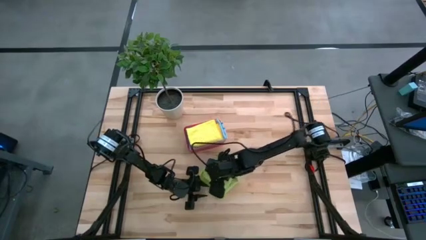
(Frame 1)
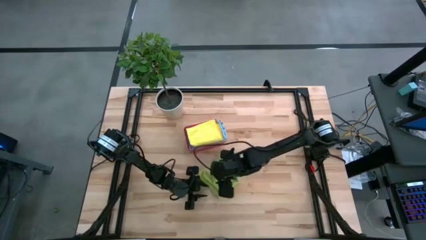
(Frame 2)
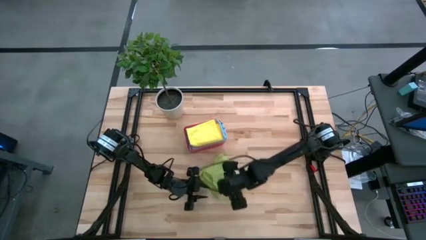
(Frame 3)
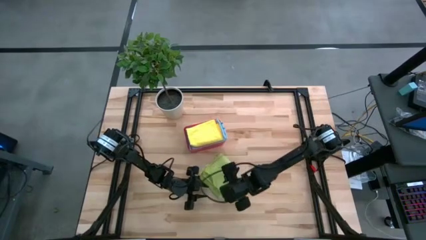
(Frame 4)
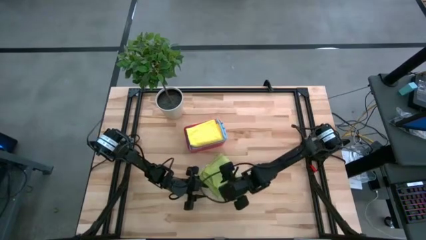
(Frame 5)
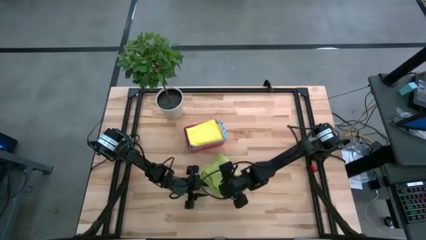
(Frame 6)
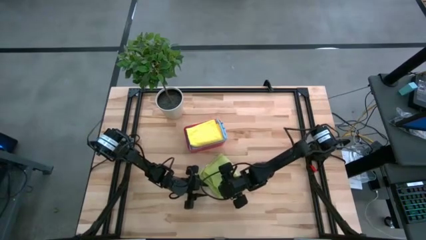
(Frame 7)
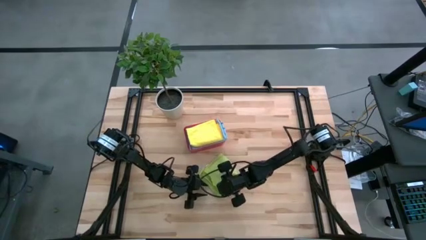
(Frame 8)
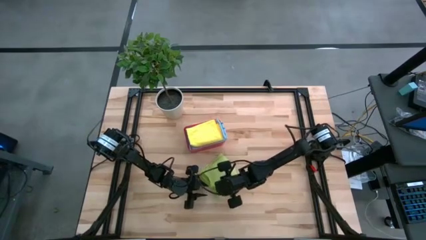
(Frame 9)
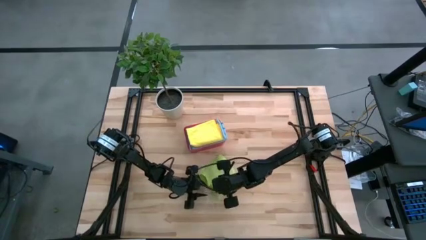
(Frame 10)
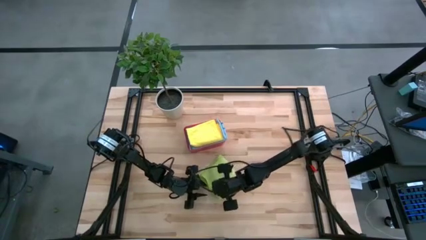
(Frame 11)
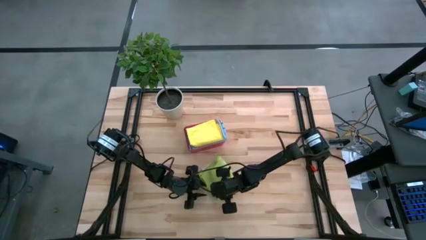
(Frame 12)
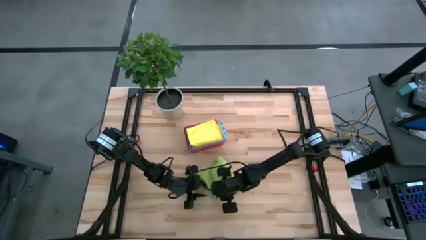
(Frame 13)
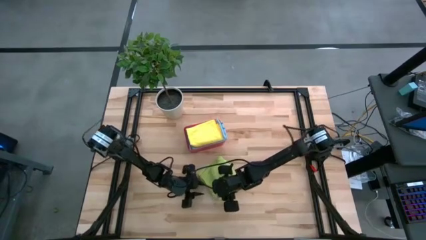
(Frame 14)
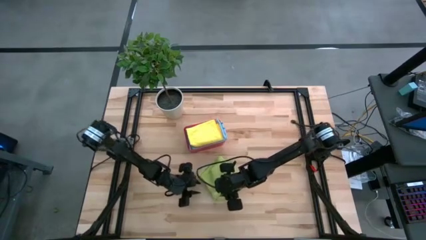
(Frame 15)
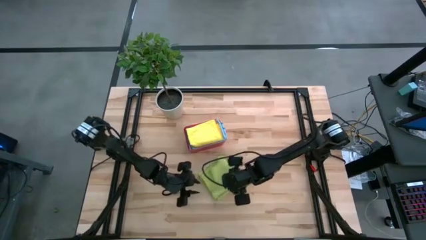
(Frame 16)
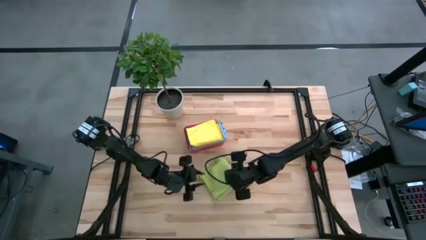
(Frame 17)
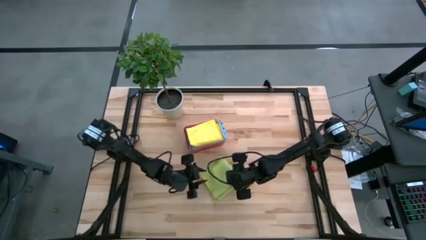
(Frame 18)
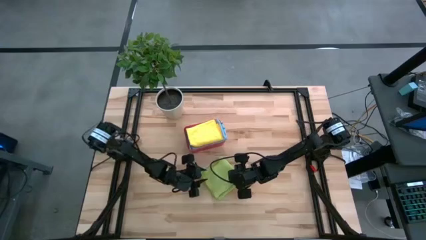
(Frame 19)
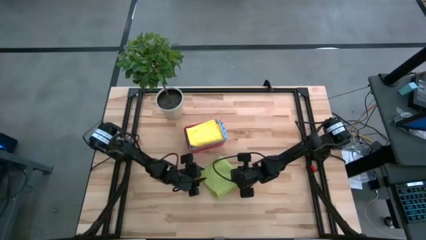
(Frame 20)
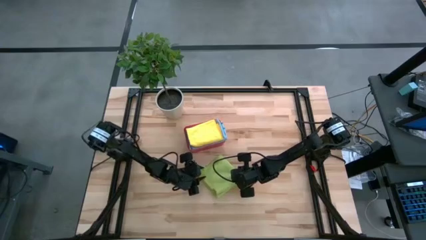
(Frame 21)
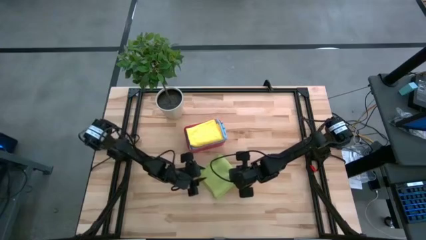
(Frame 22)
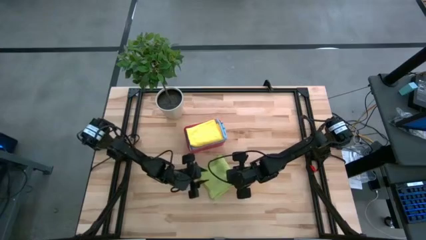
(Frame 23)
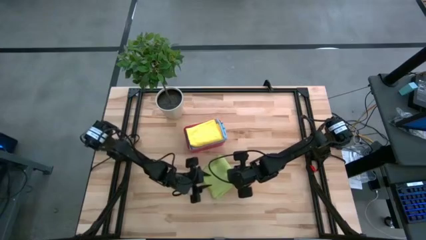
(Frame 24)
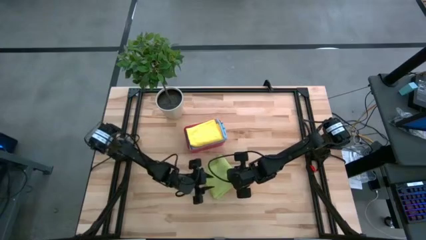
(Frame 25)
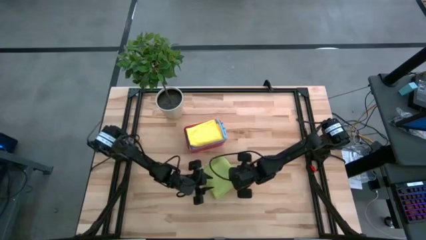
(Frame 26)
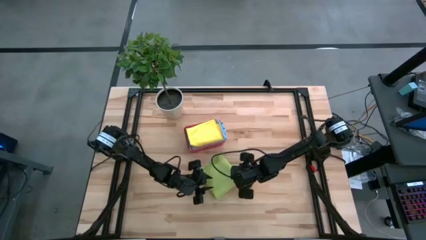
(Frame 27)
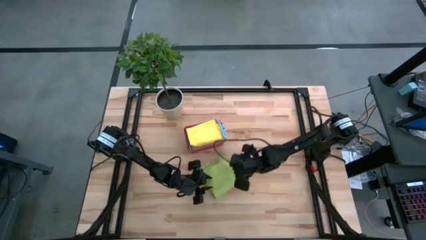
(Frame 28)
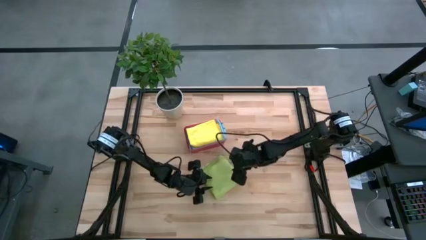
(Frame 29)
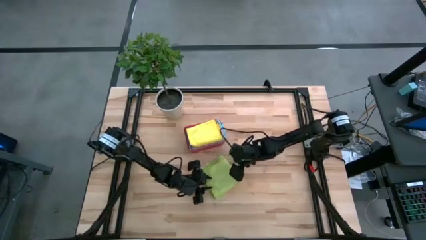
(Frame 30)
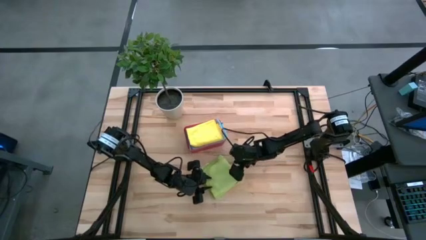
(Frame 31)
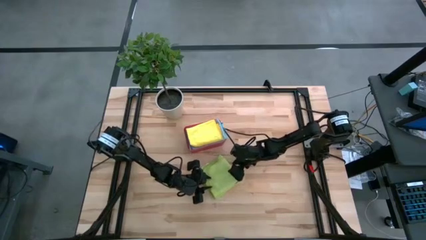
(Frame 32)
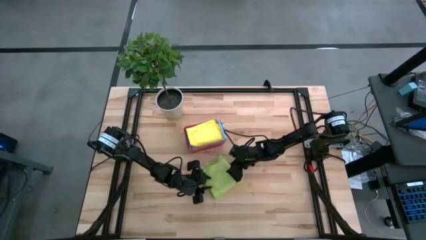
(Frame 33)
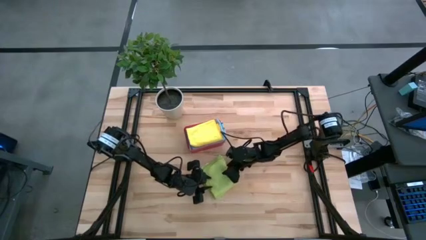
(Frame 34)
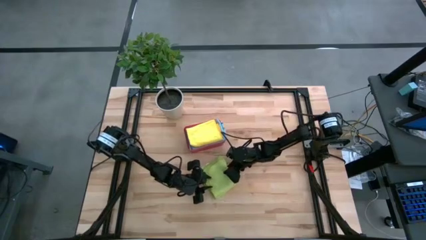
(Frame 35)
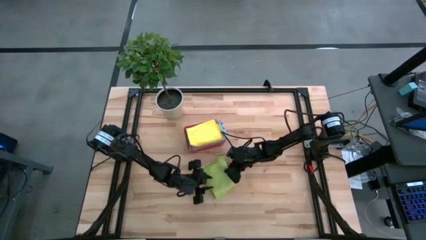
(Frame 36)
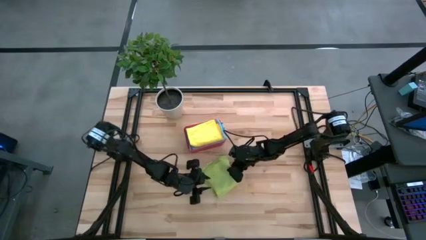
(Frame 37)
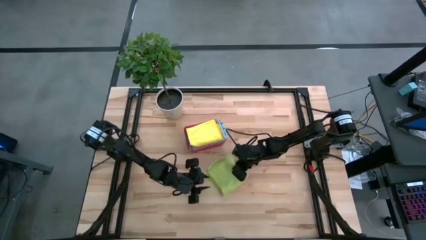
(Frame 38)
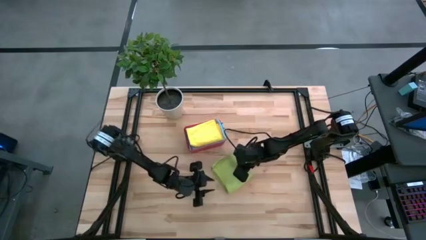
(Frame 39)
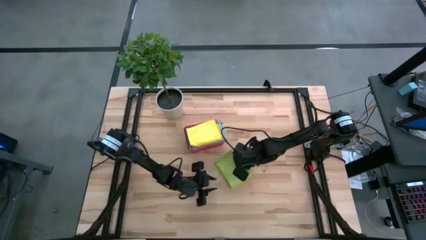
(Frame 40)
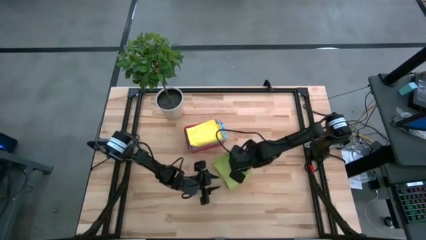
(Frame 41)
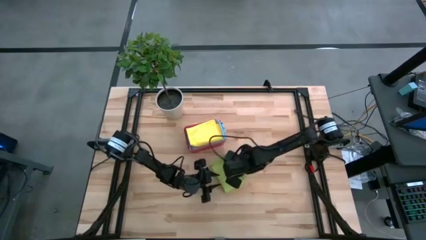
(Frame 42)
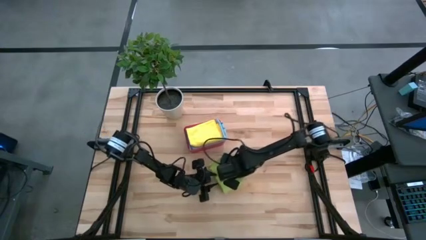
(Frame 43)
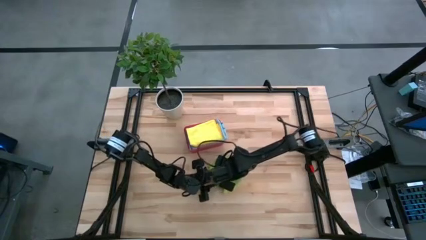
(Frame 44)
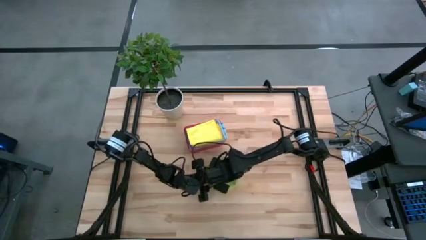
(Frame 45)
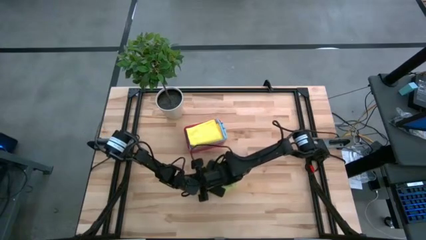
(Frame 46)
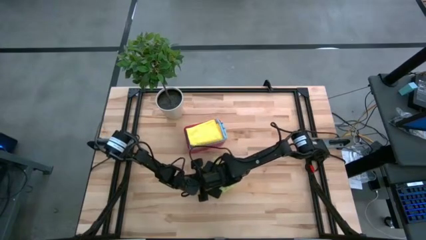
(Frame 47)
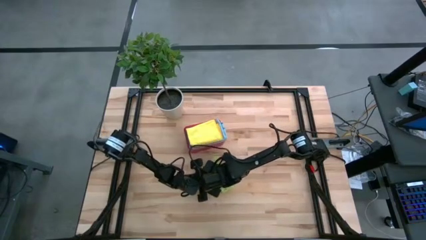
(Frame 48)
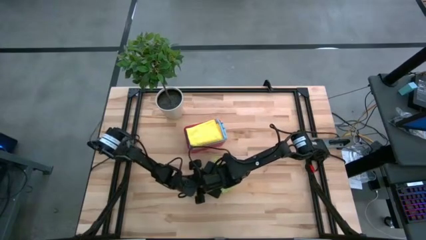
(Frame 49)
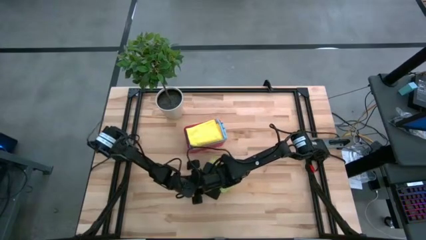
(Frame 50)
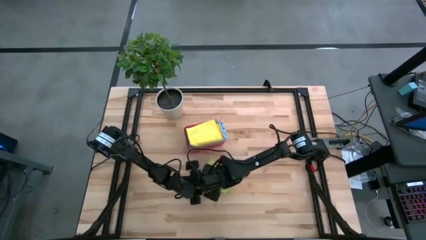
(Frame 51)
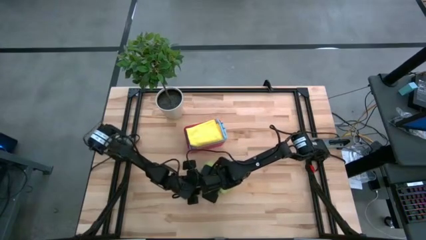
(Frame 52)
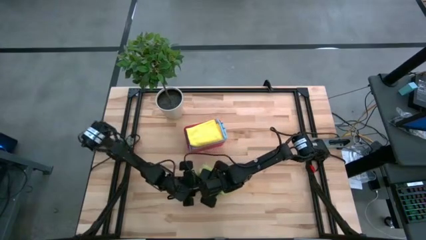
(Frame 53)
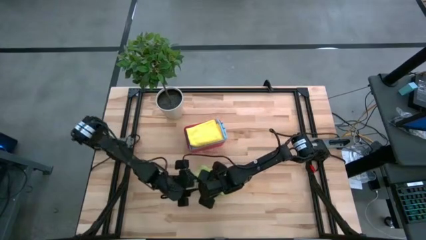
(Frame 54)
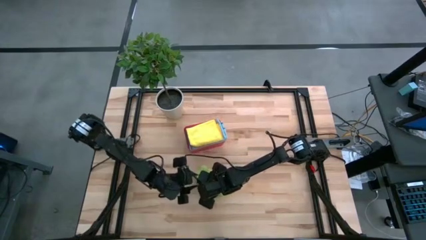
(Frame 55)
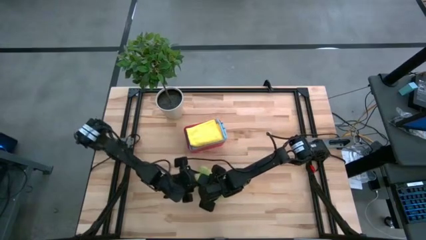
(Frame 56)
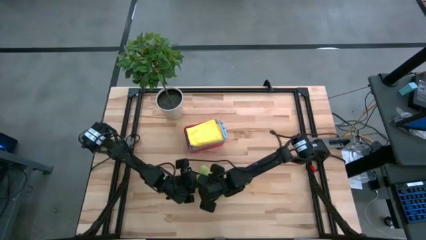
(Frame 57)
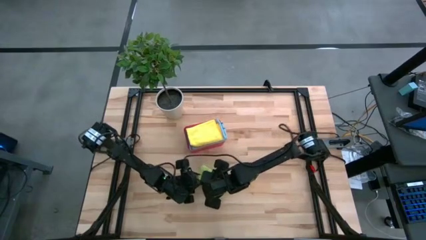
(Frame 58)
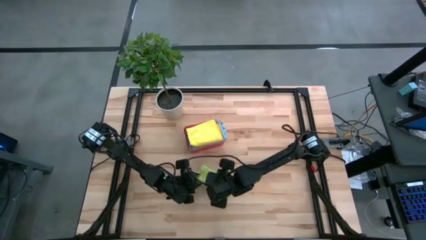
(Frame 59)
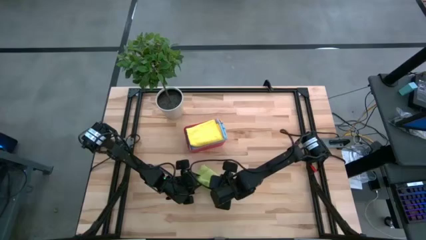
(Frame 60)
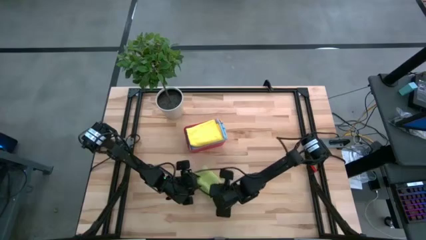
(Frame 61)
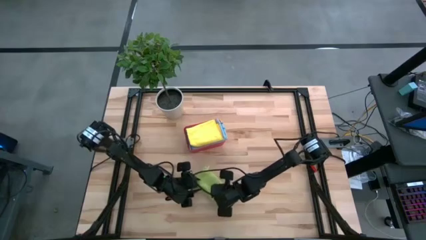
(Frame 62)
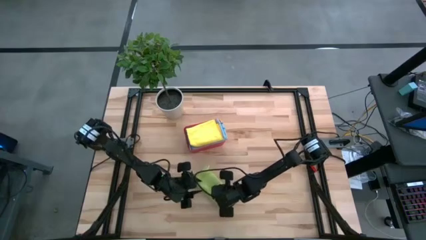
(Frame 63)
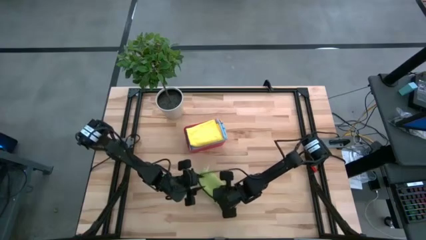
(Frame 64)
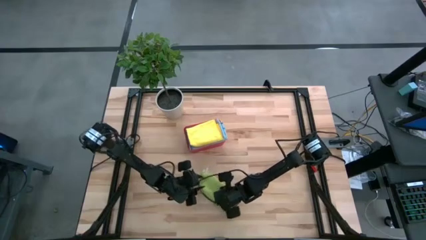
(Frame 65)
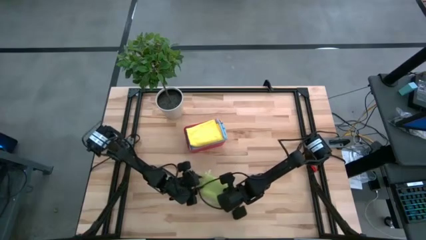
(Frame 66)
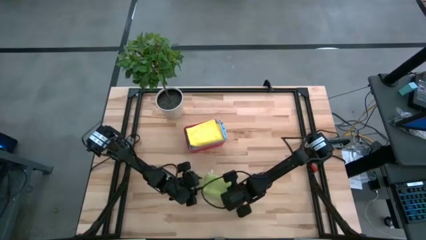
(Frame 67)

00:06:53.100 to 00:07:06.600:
Task: Fold microfiber towels
Fold the green microfiber cloth

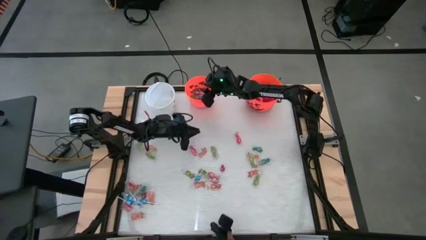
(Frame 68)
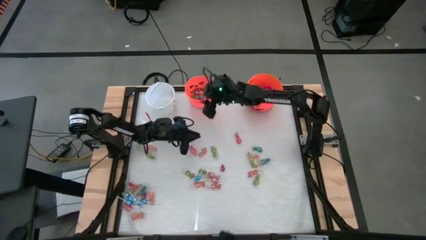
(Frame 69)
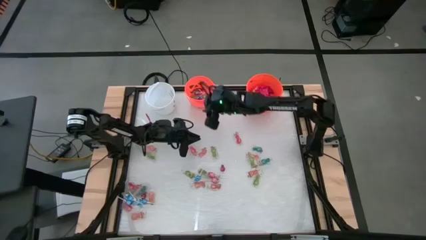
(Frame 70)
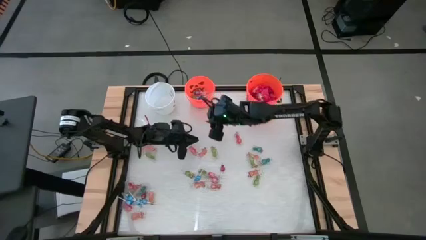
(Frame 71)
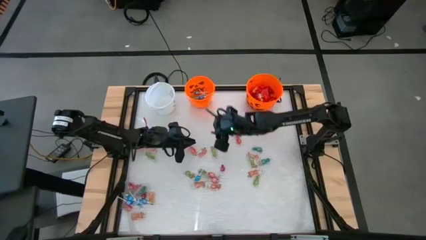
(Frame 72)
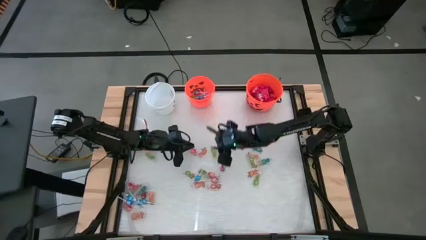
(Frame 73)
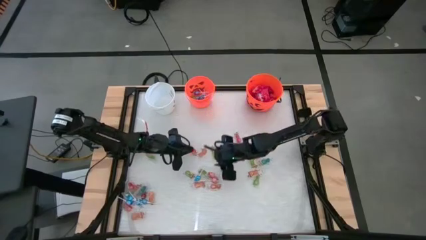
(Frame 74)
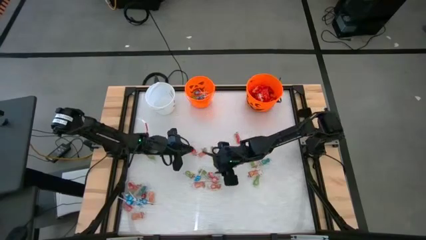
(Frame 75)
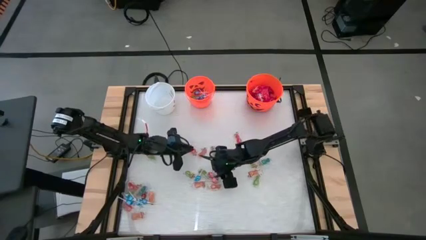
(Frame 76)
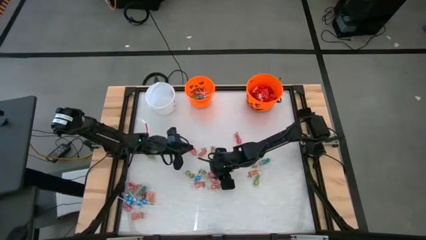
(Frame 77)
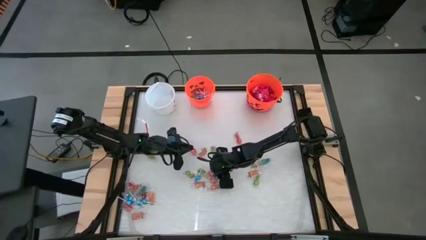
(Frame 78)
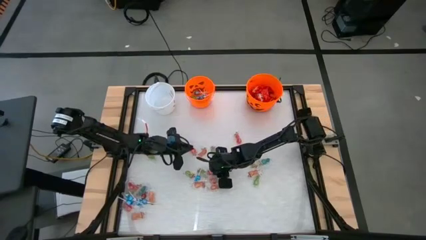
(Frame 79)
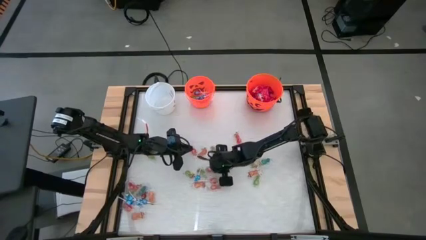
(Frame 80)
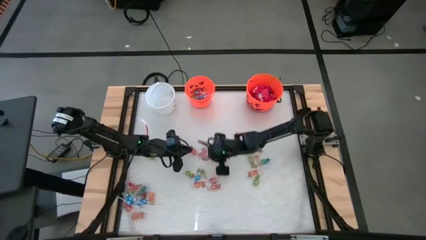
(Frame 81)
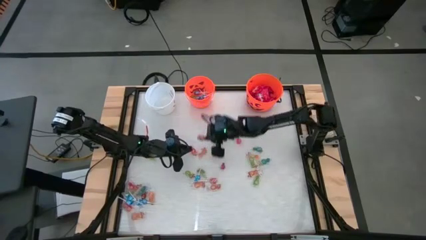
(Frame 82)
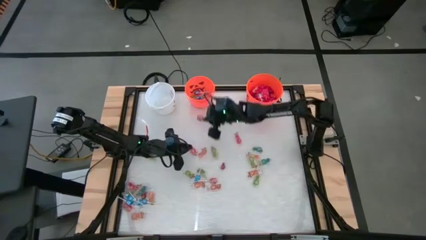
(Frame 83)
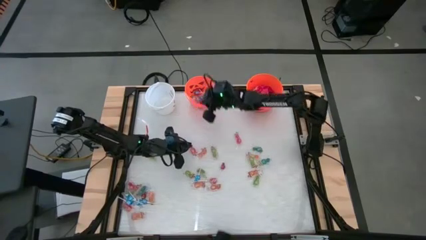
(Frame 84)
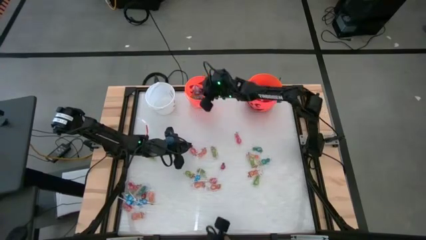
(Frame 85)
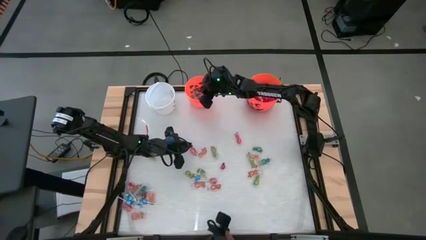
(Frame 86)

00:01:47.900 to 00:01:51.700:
Task: Sort candy by brand, put in halloween buckets
Put the pink lollipop into the left orange bucket
